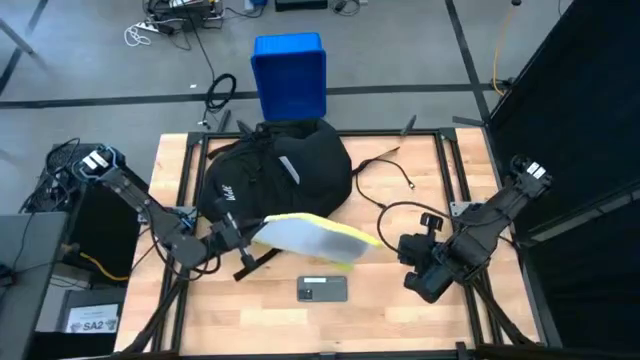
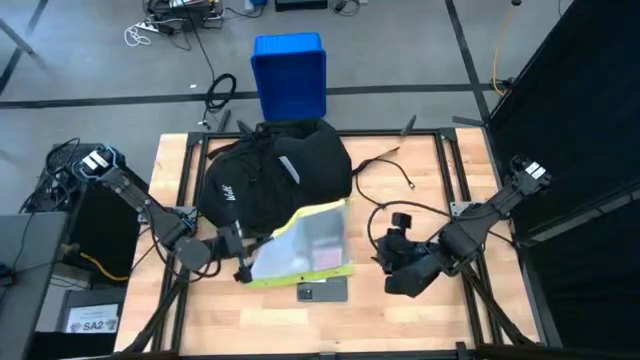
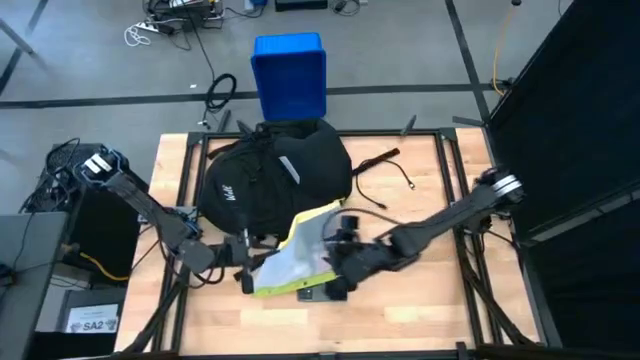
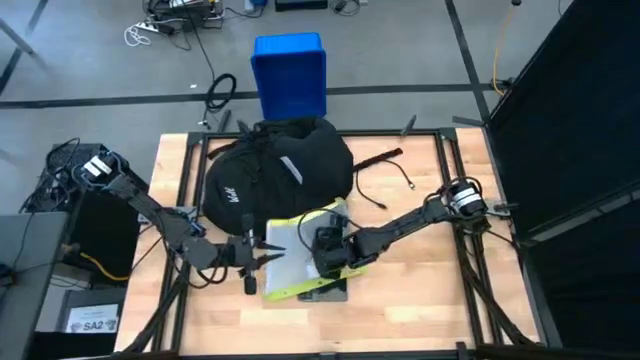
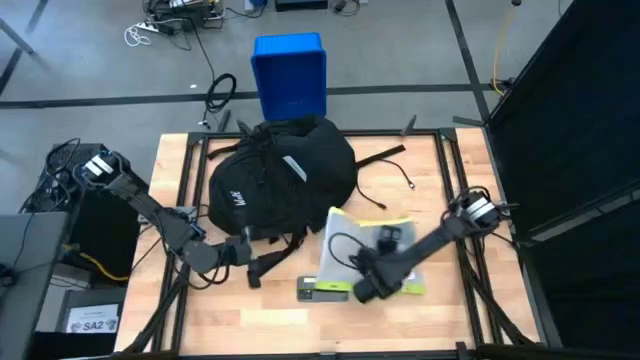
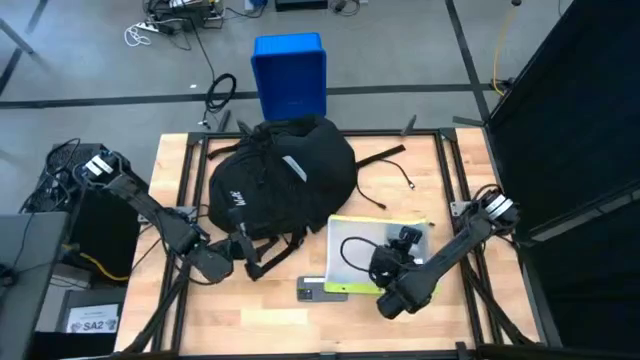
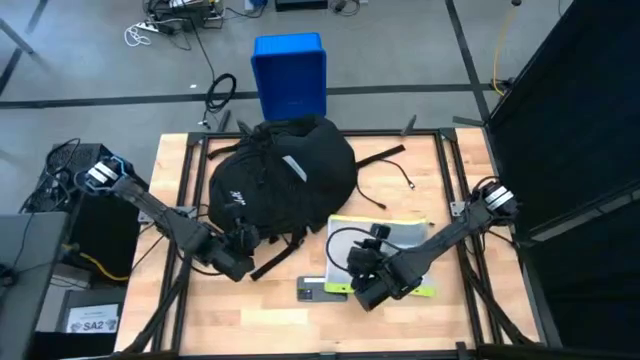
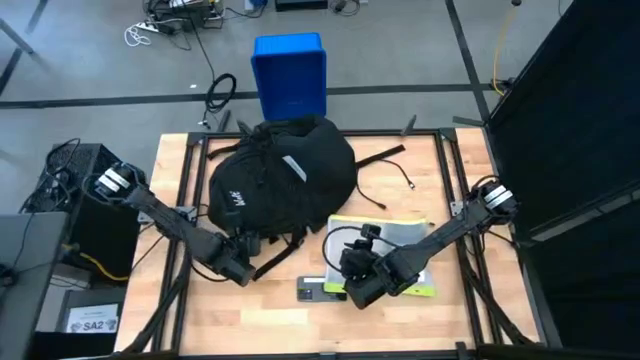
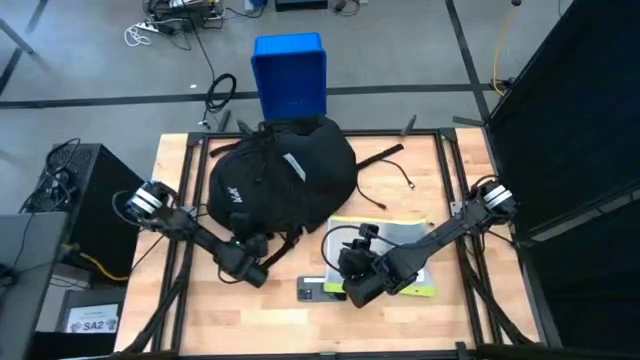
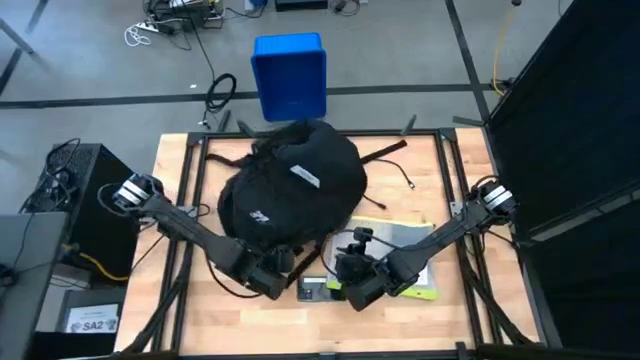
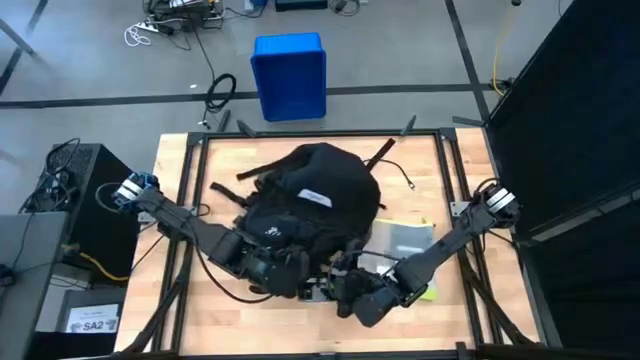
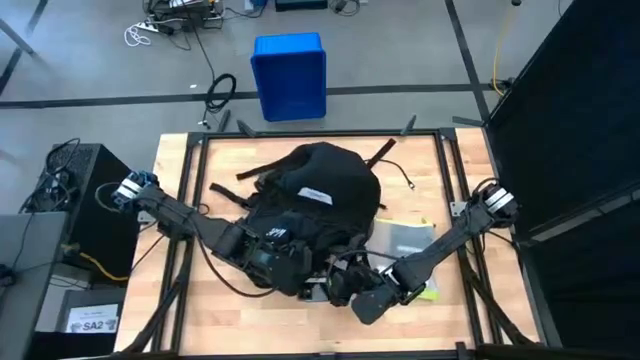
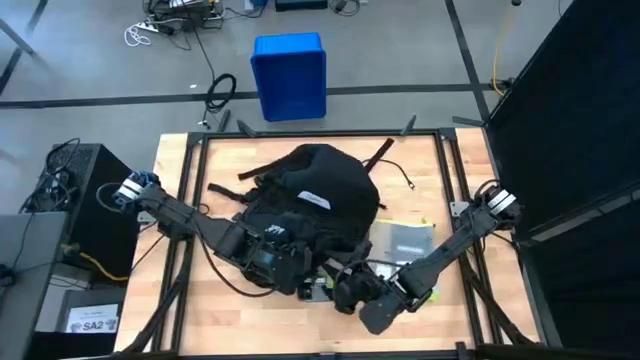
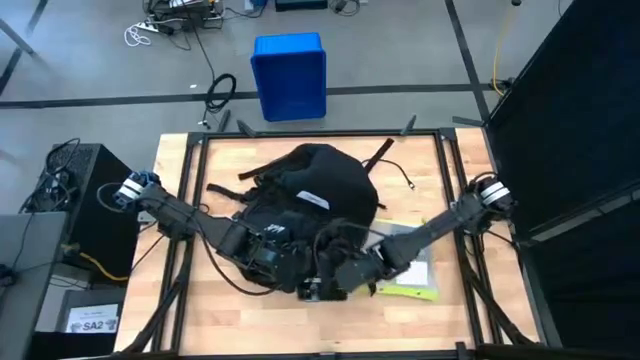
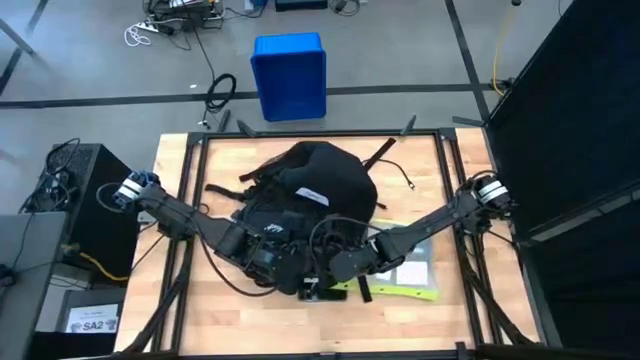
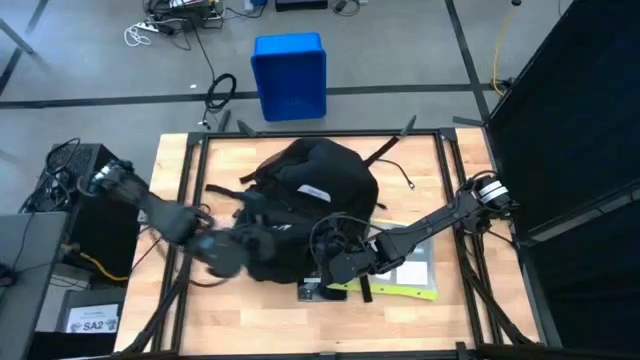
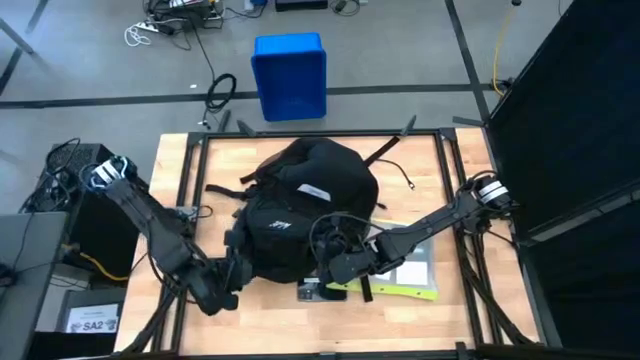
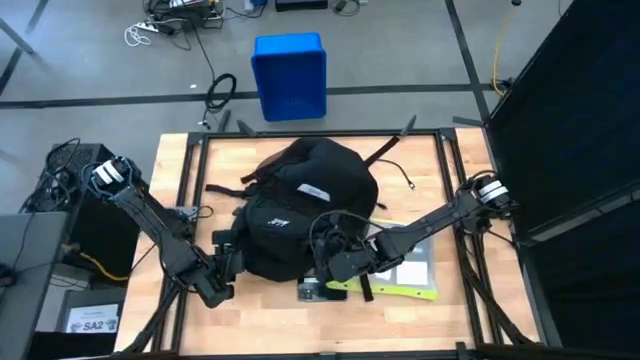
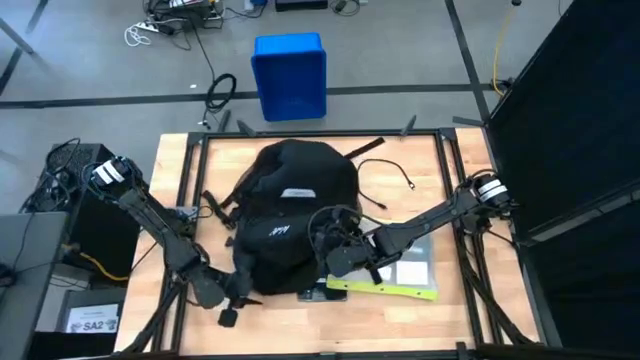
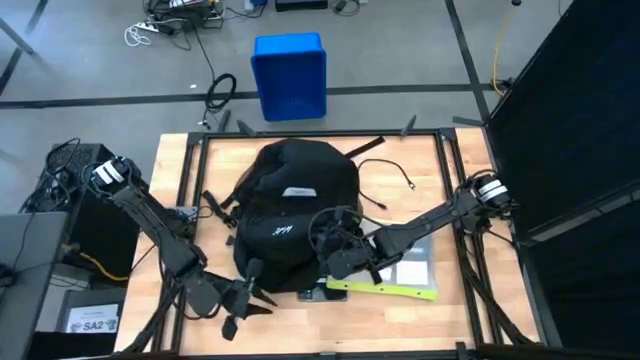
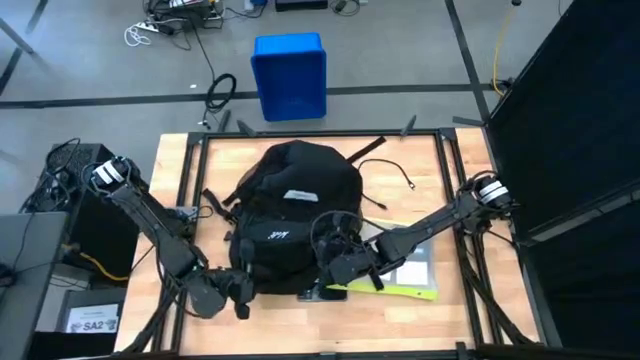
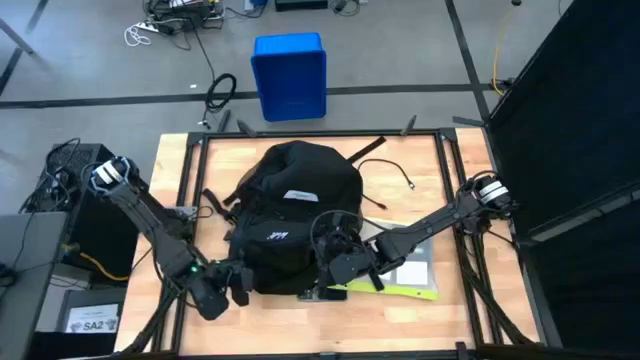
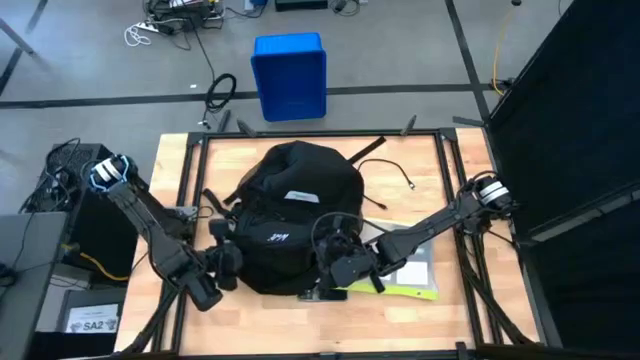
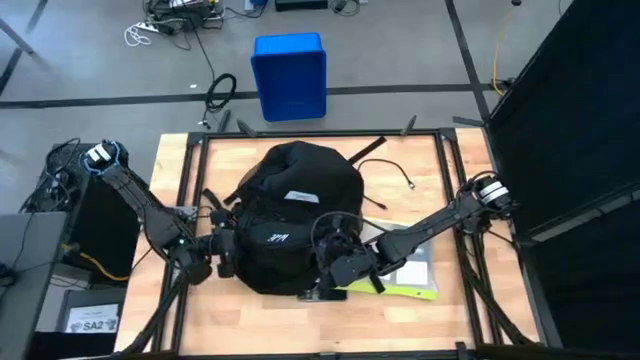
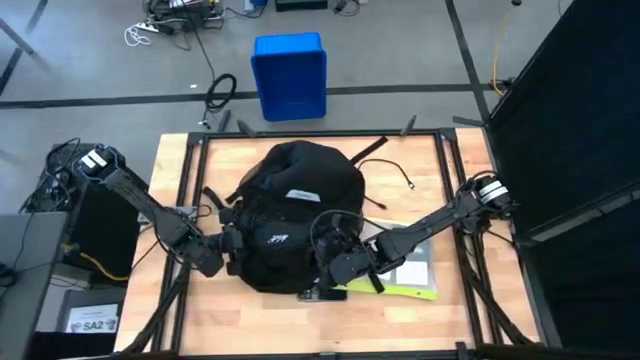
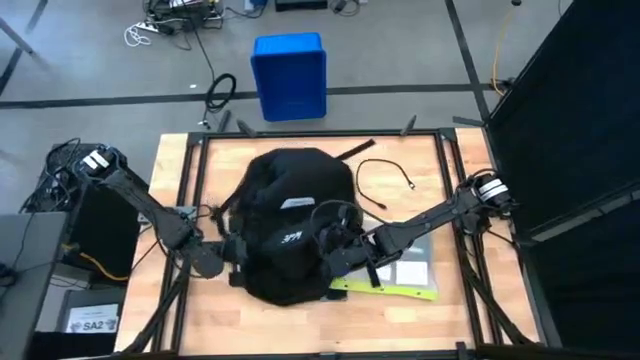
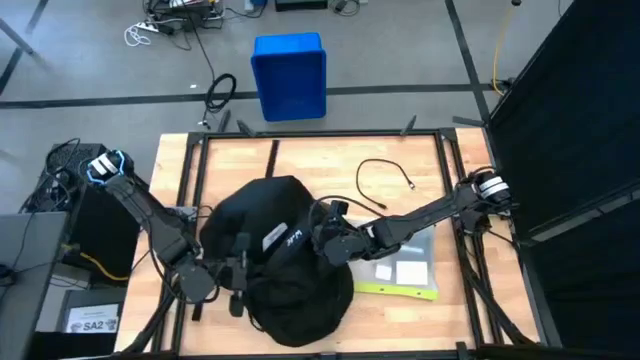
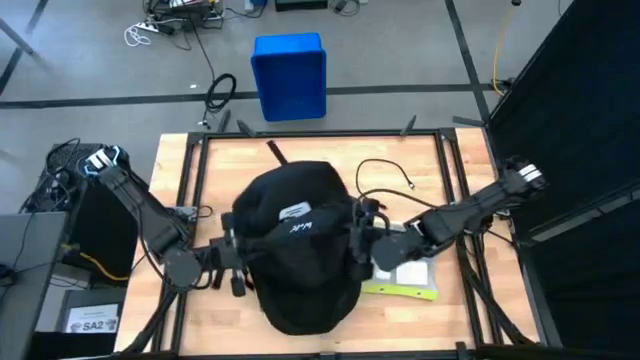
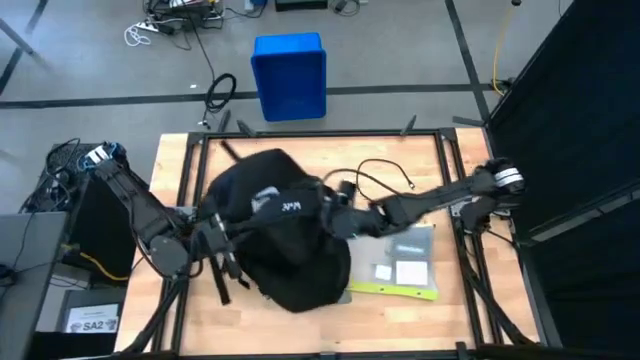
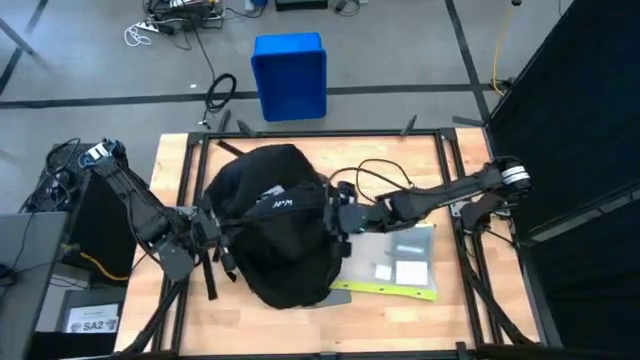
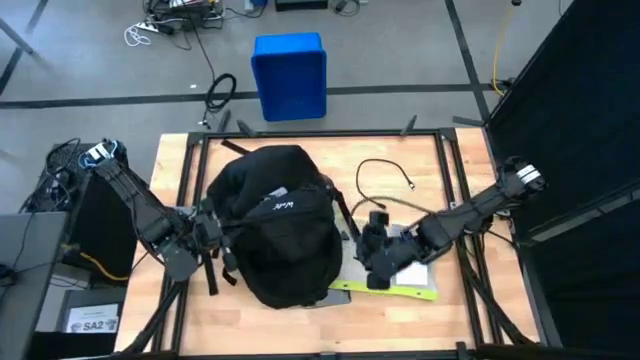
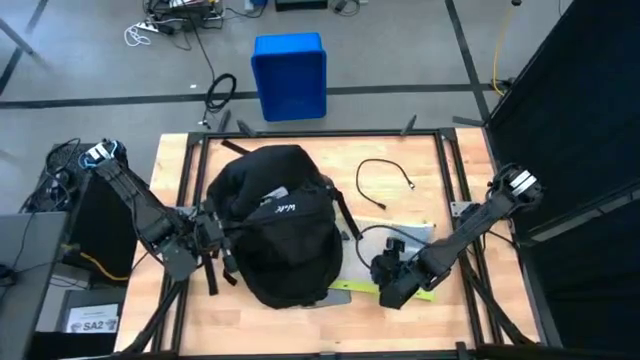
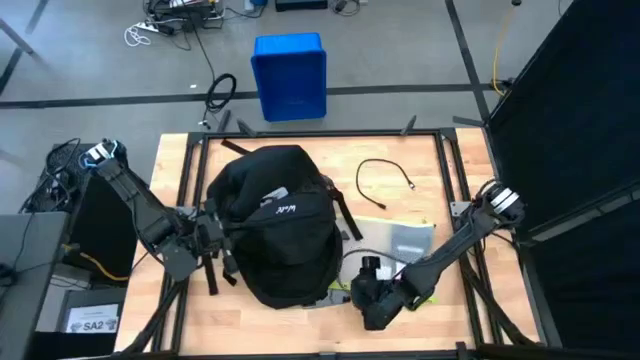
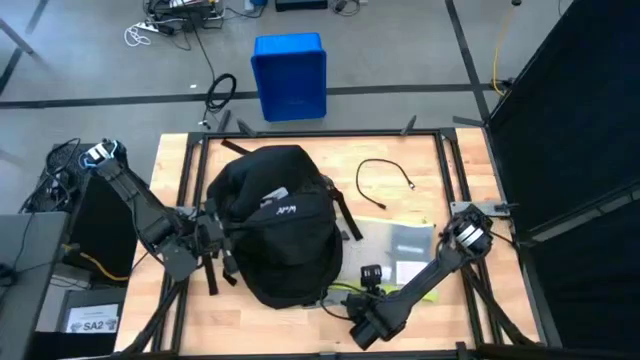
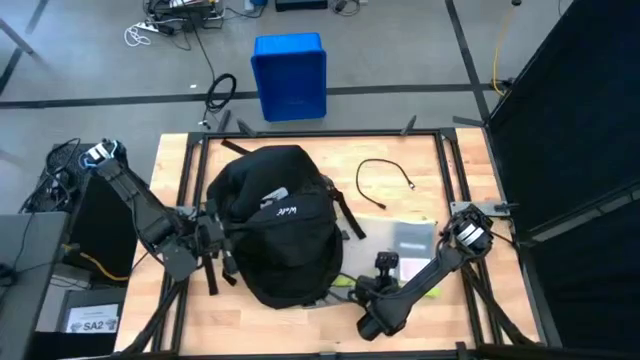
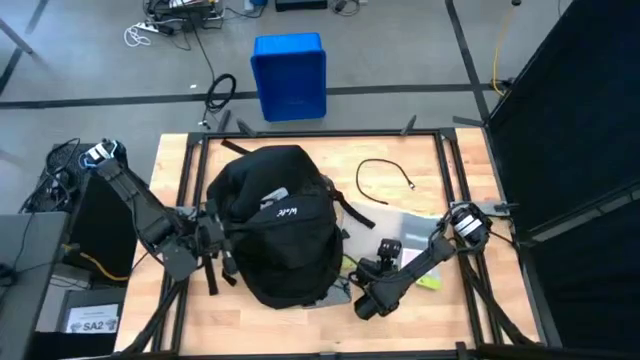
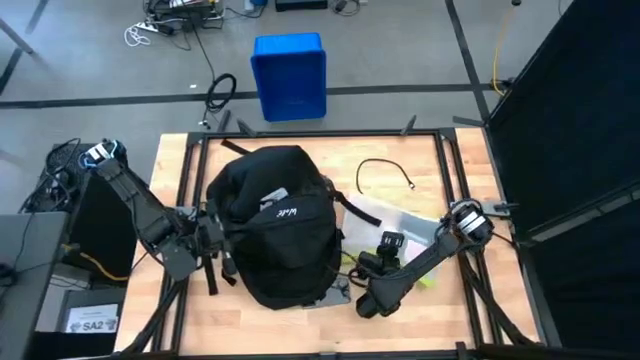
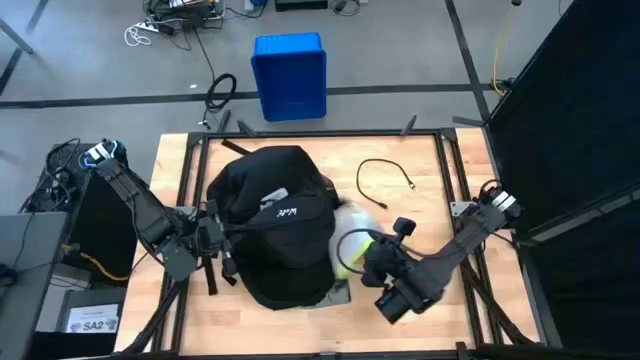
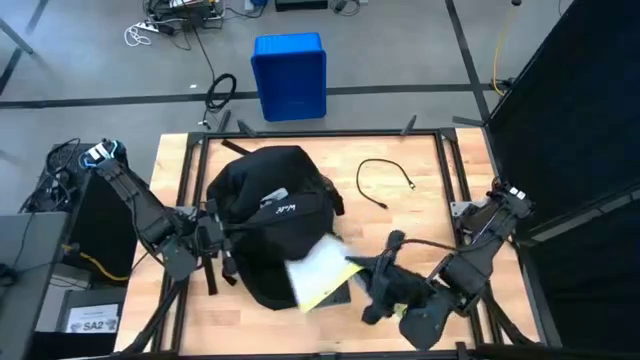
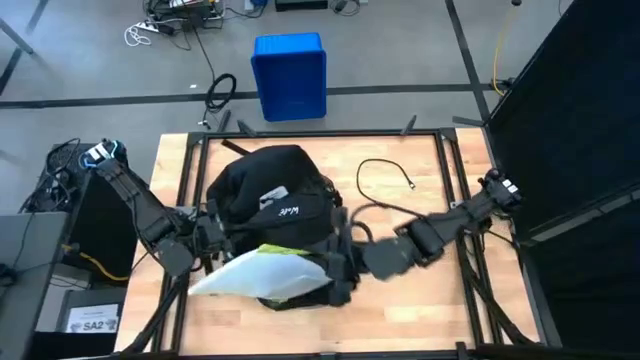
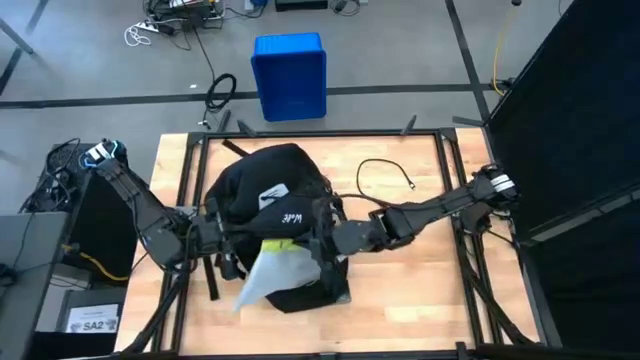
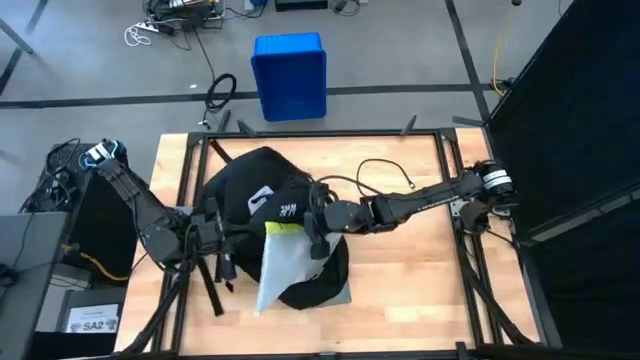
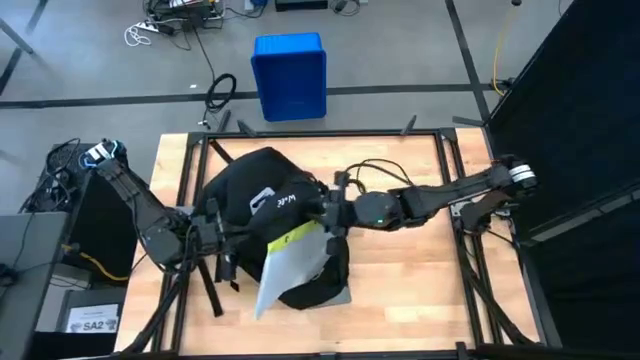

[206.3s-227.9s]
Task: Unpack backpack
Put the zip bag into the backpack
